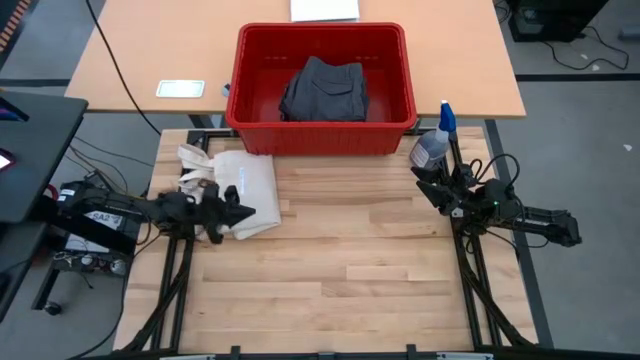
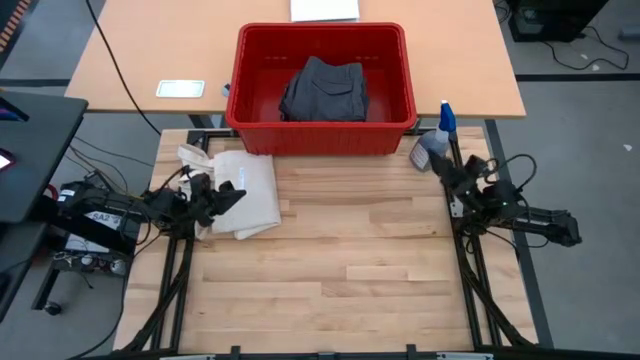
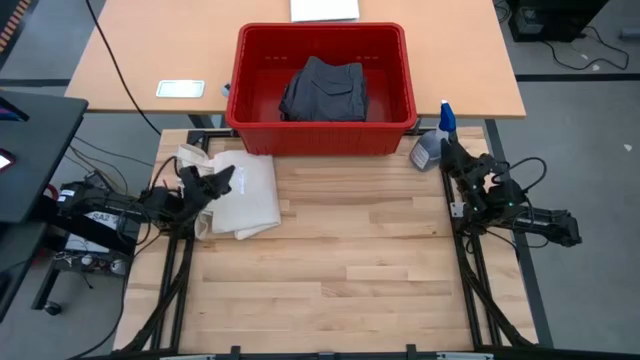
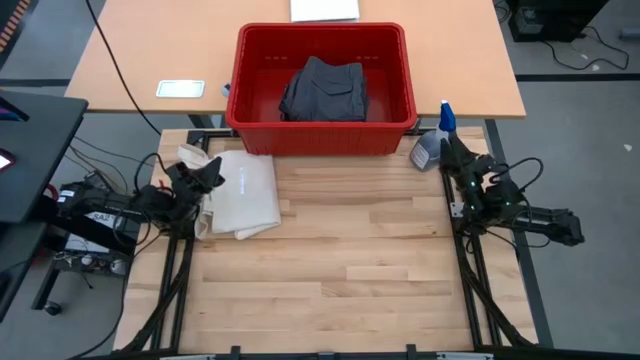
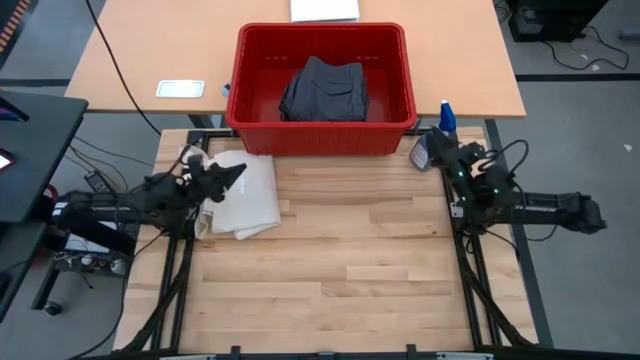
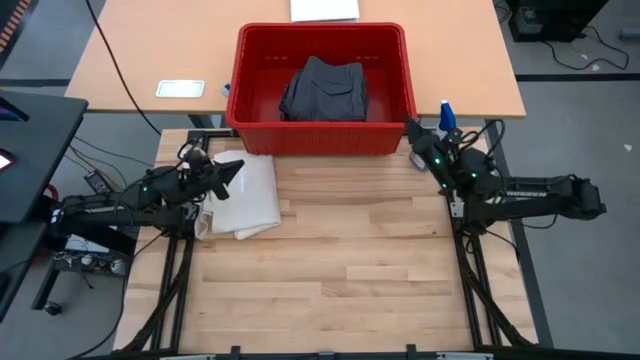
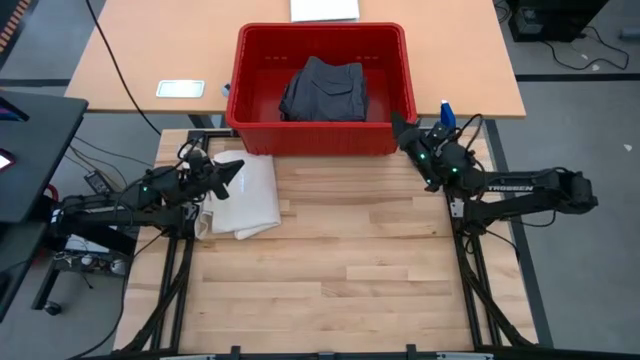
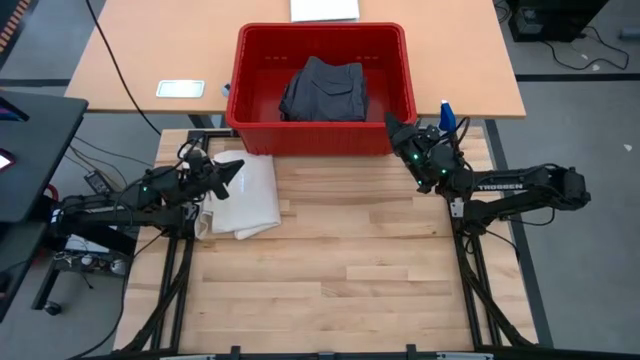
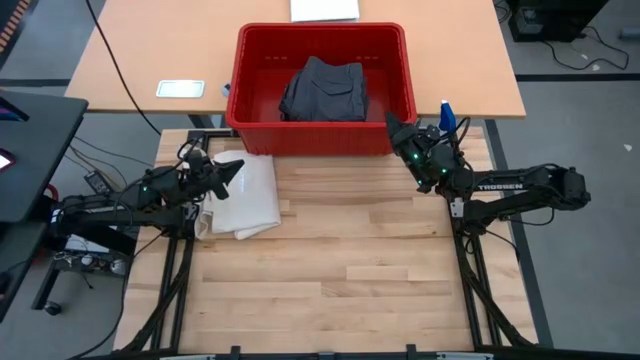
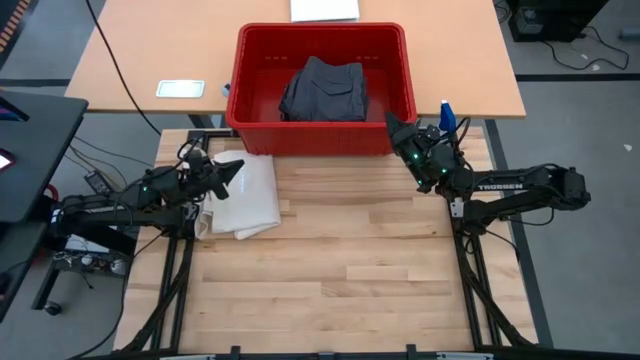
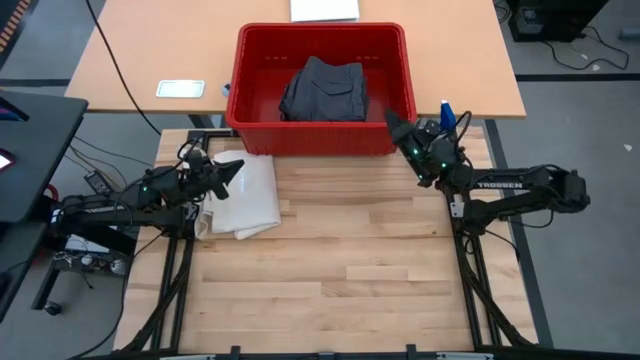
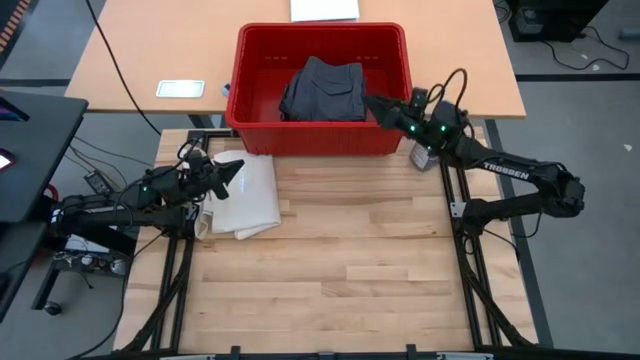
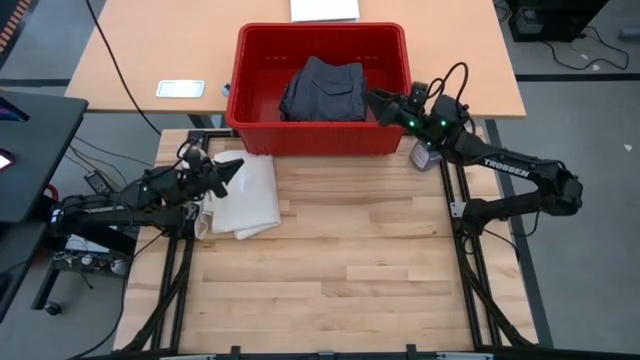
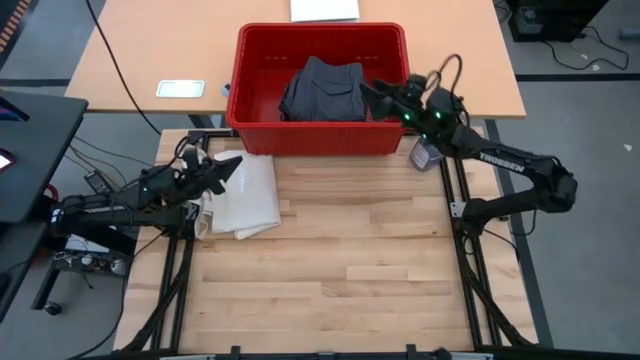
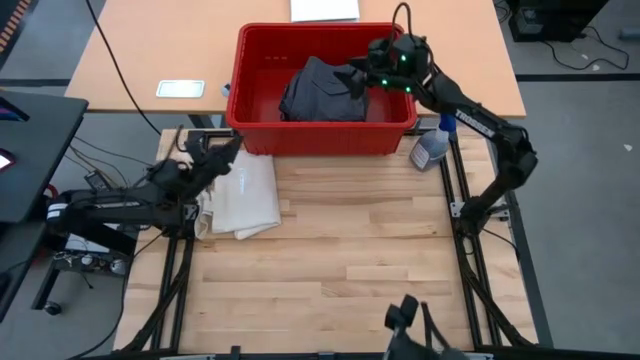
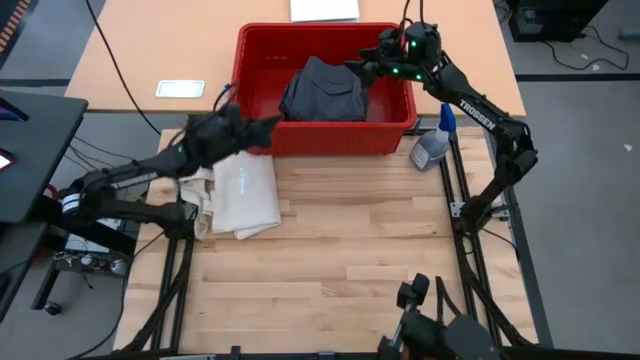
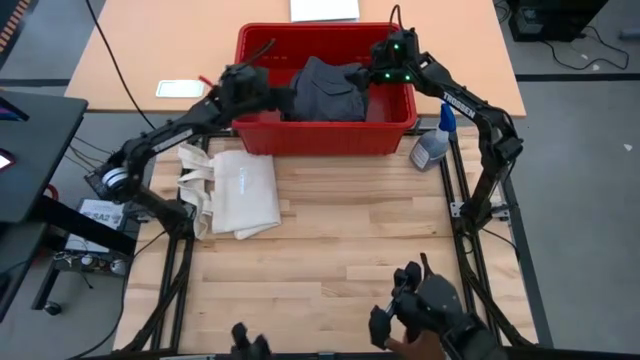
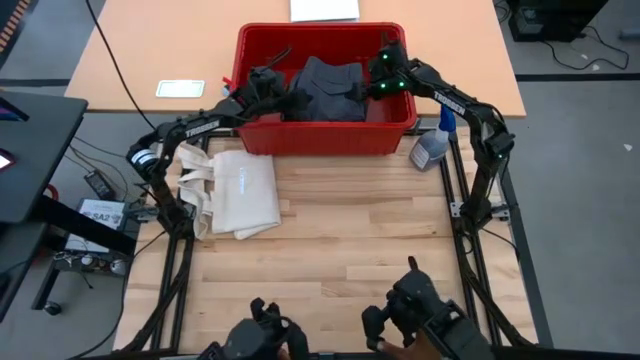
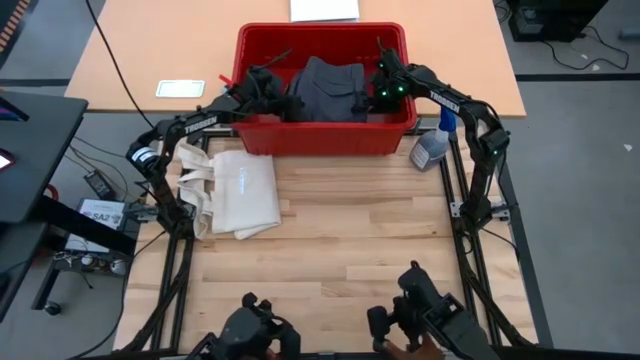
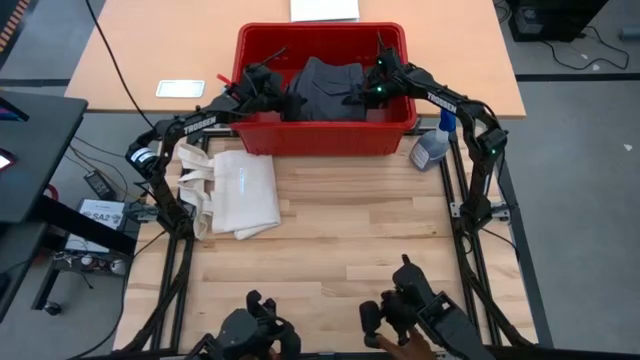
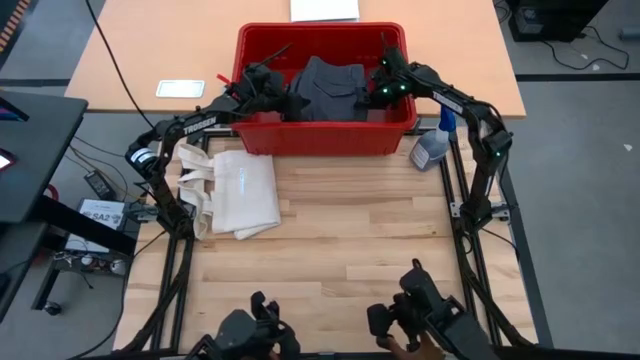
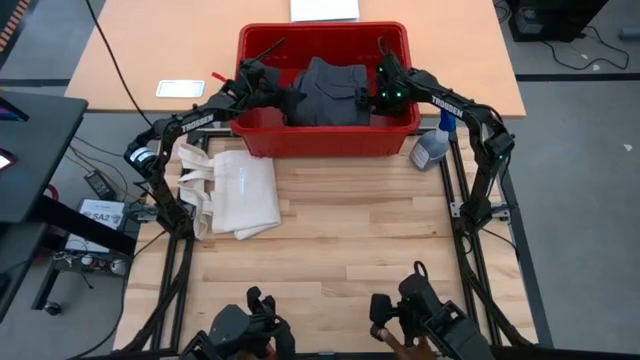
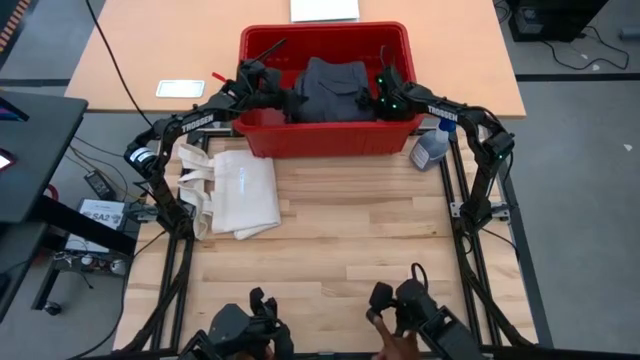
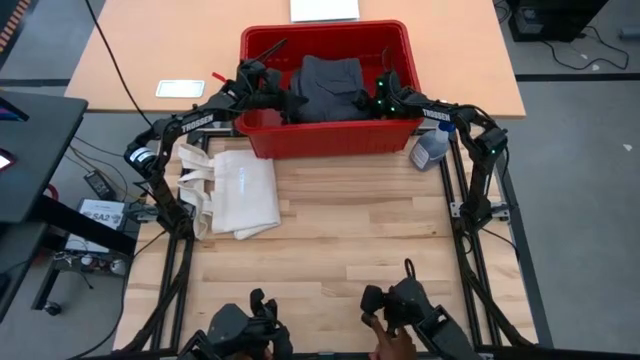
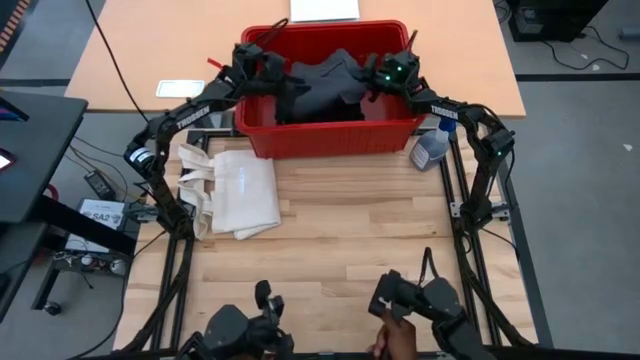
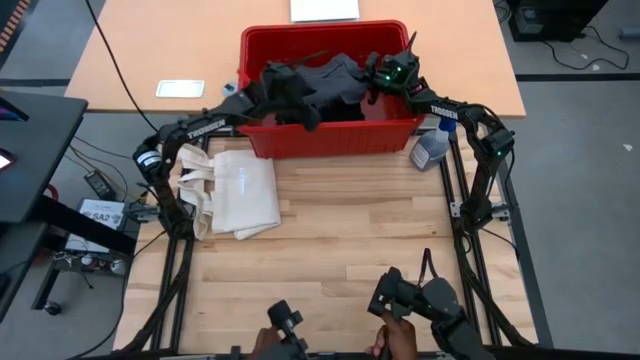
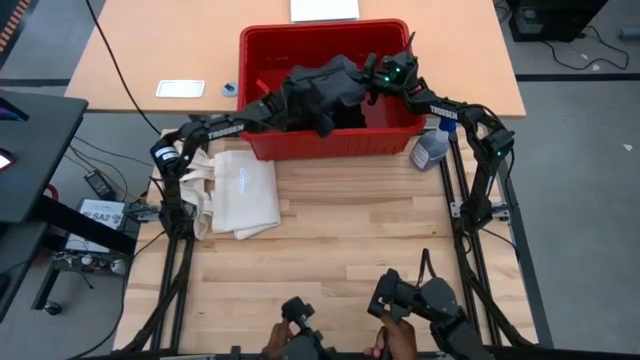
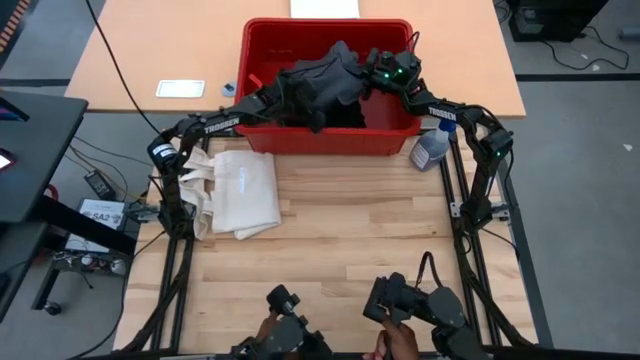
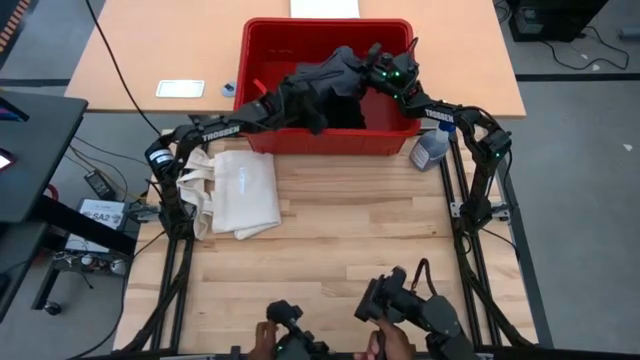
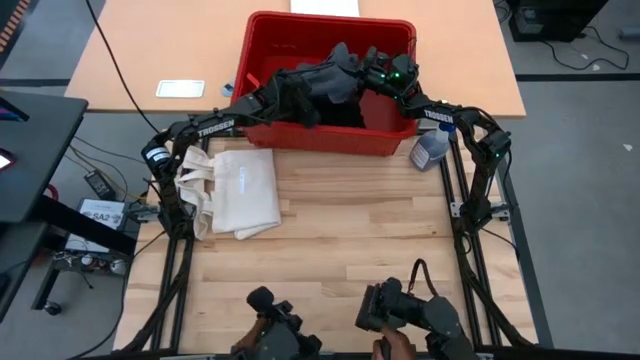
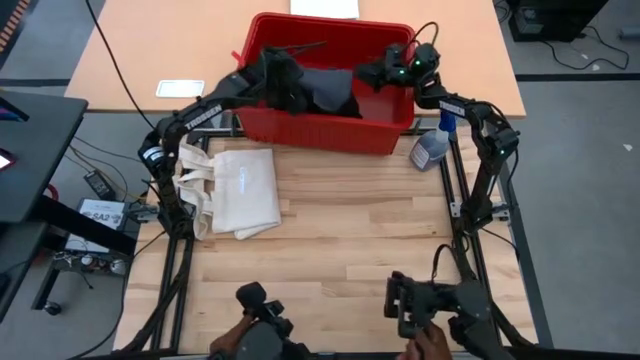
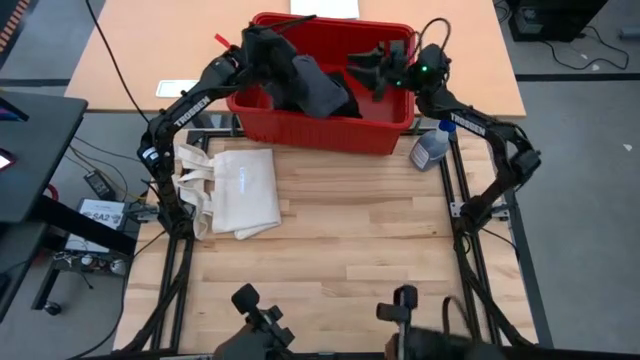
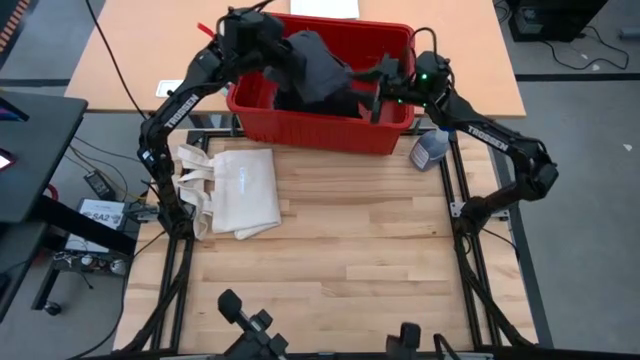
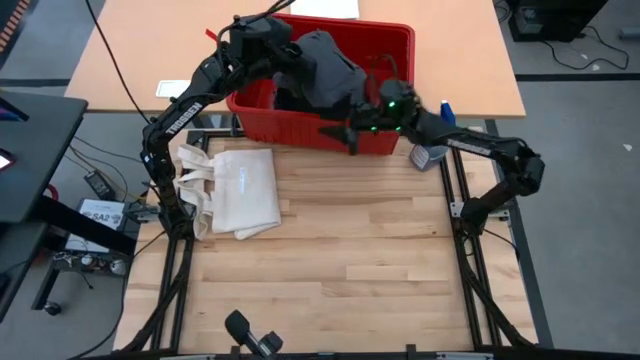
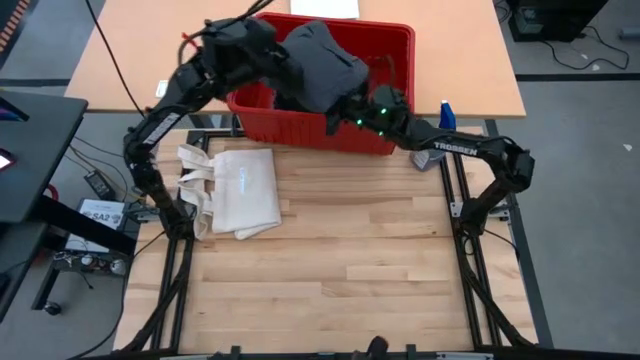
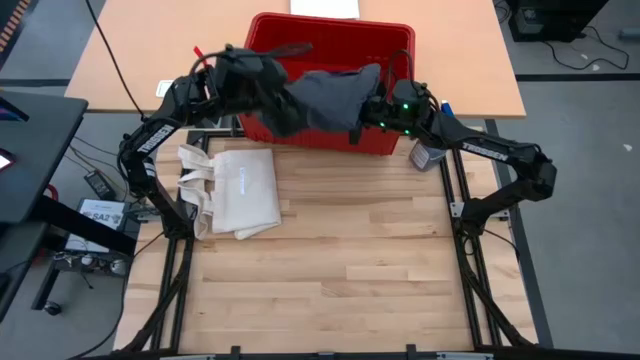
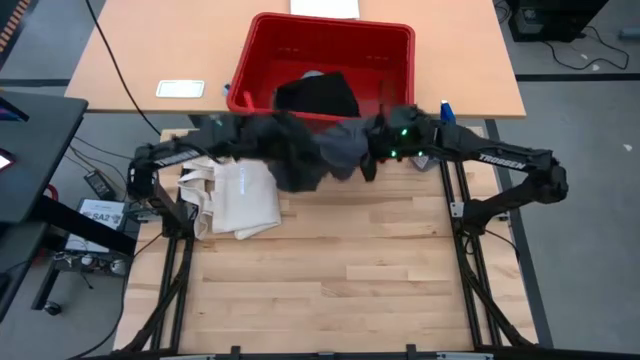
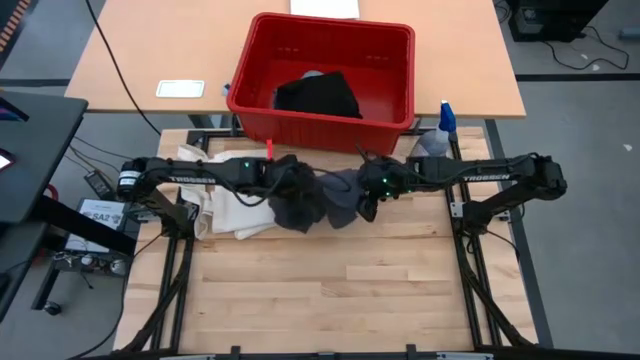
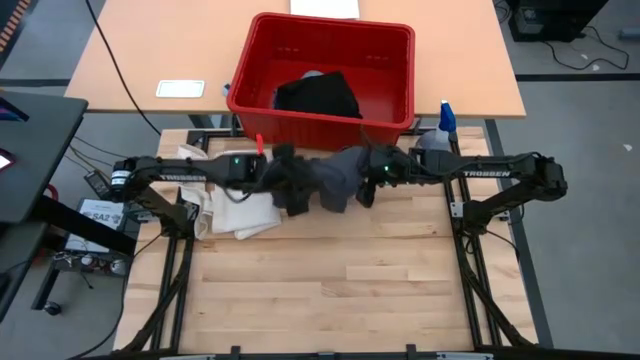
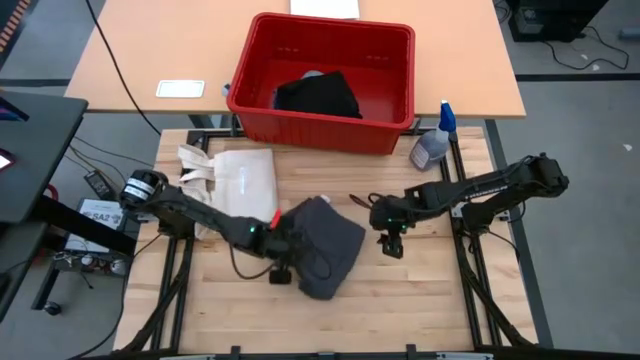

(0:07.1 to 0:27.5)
Task: Sort clothes
Remove the gray pants from the red bin
